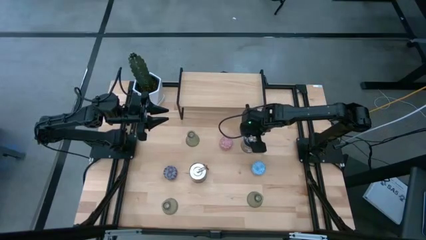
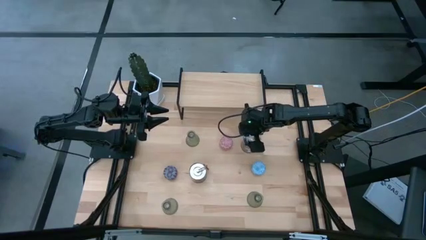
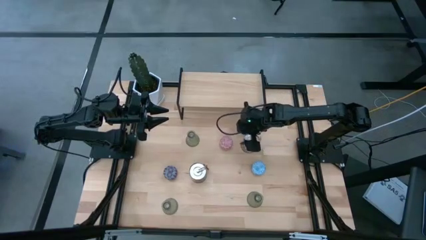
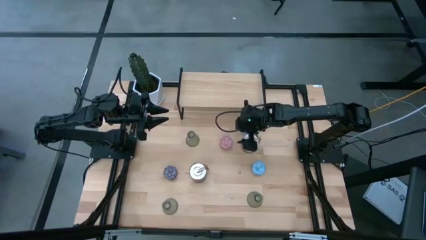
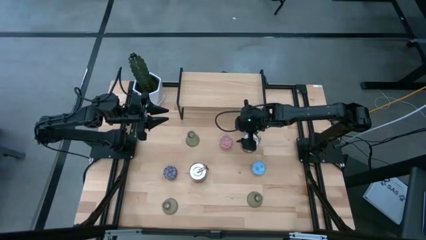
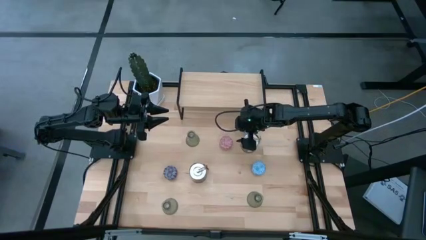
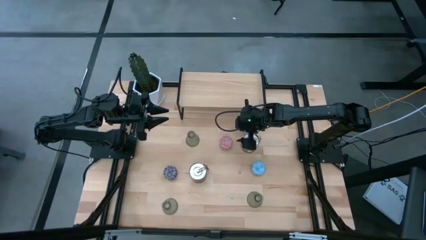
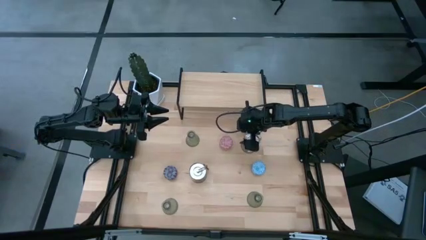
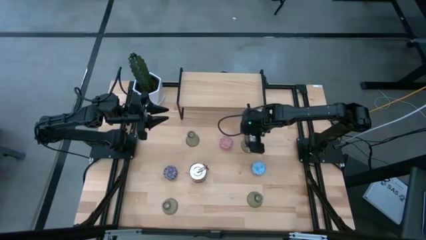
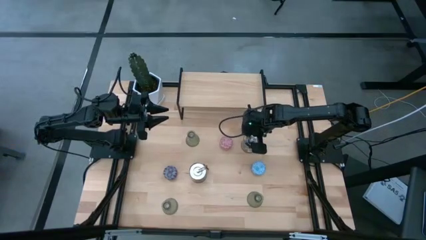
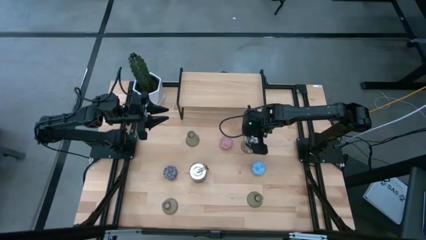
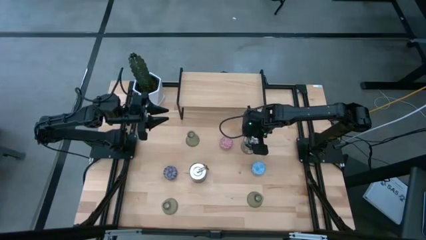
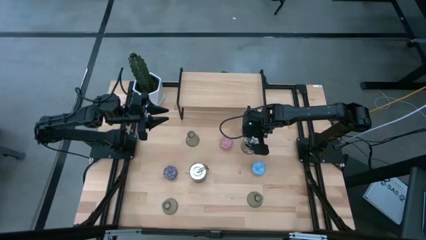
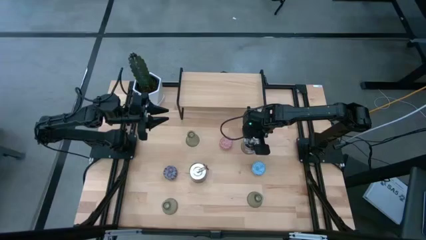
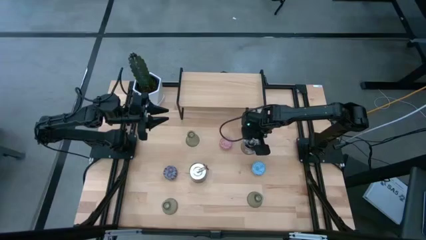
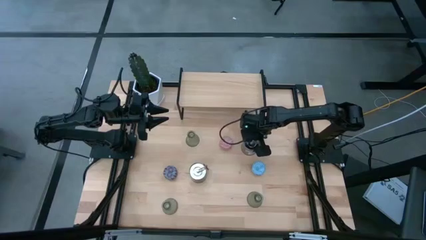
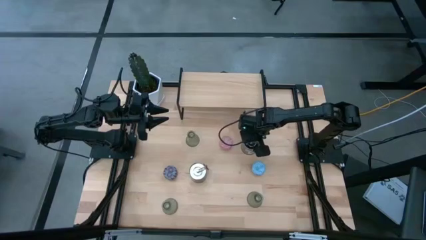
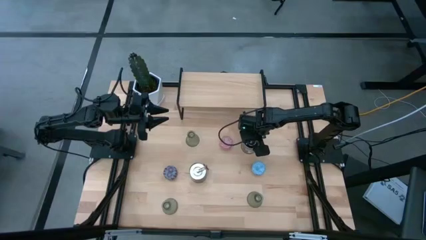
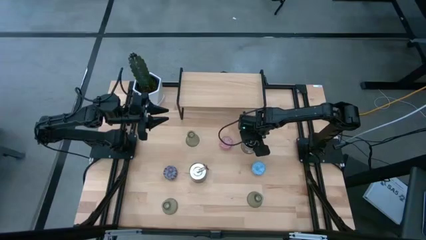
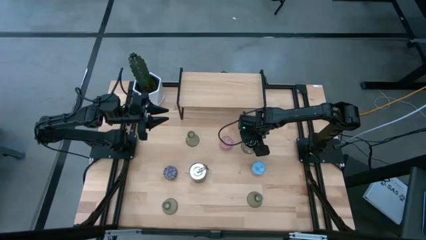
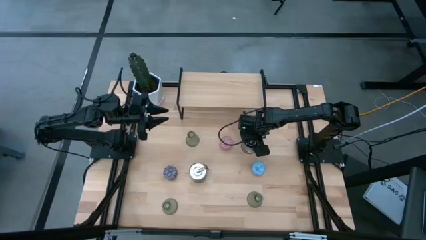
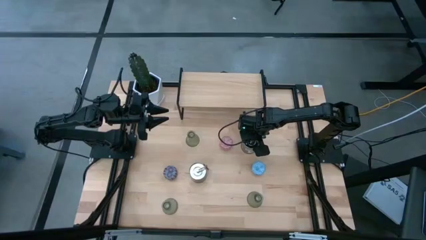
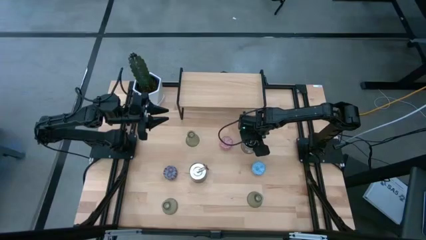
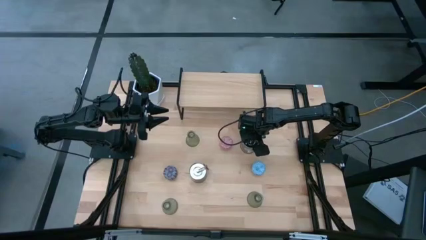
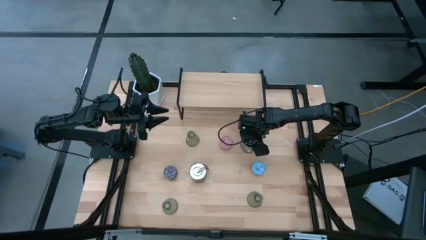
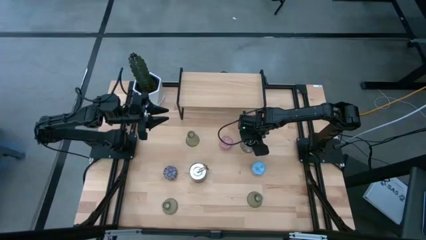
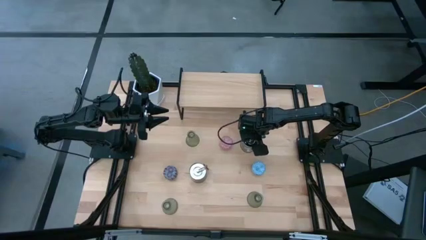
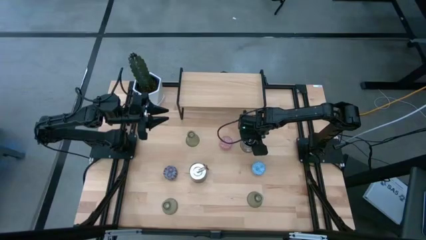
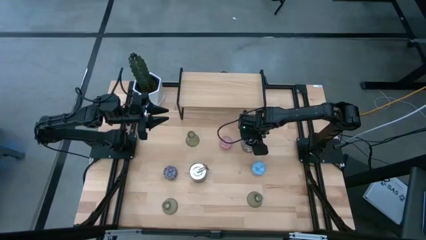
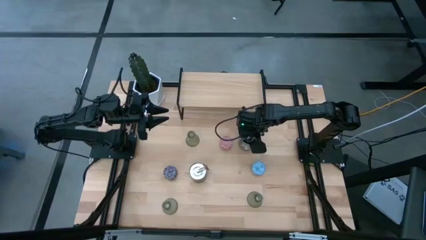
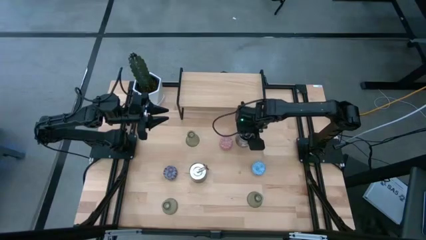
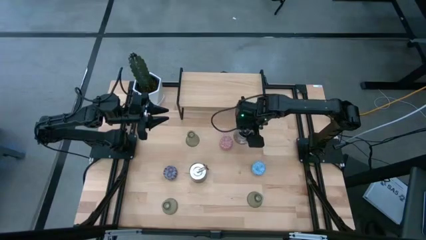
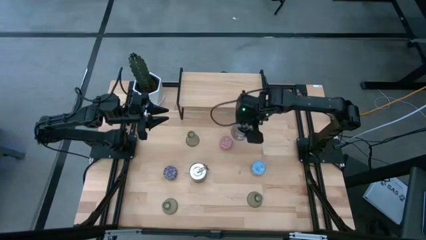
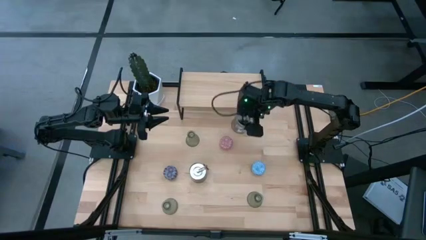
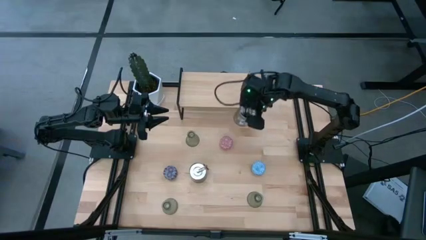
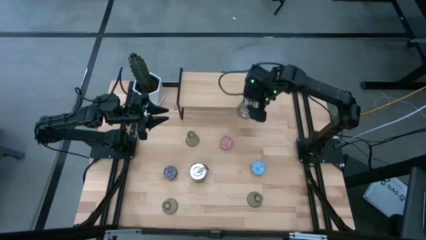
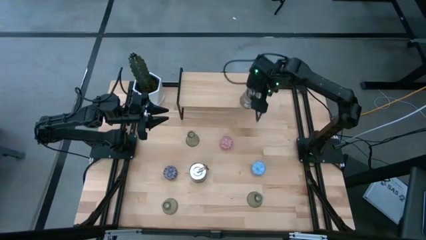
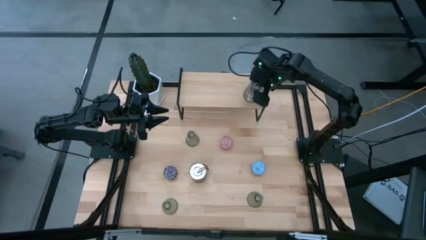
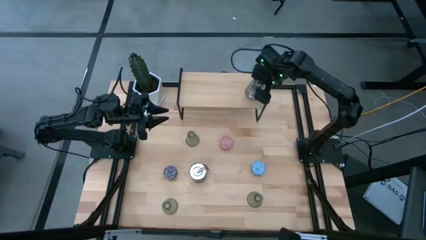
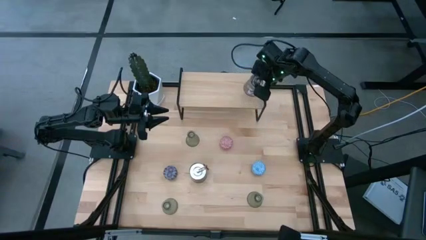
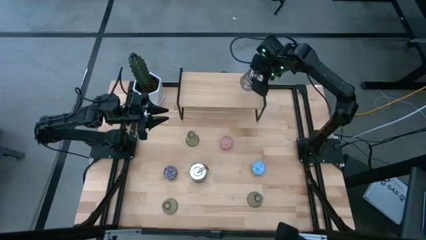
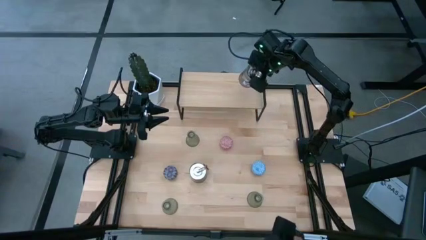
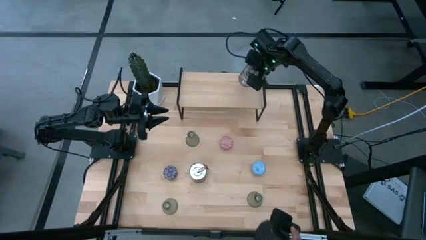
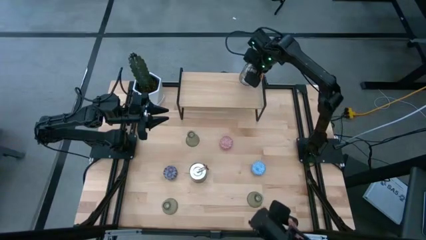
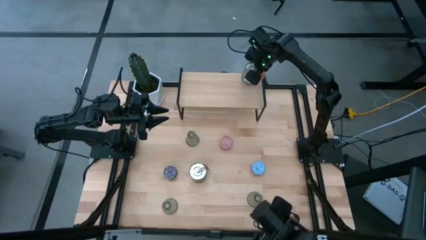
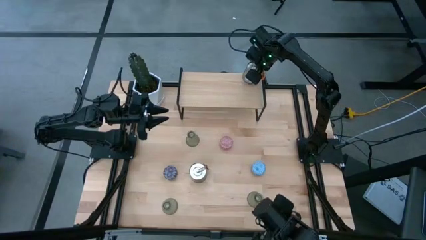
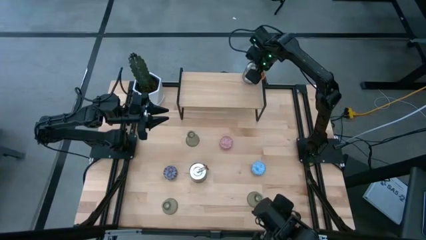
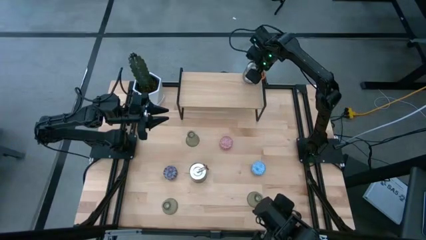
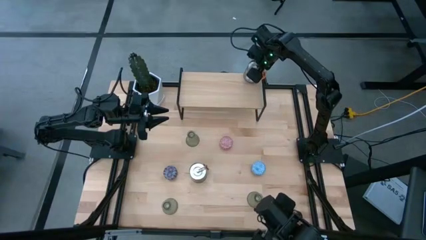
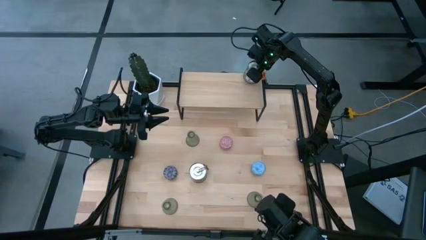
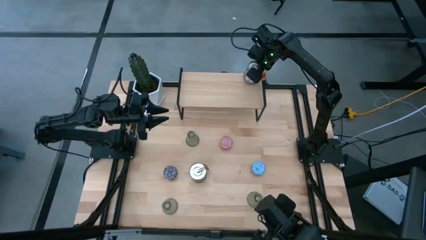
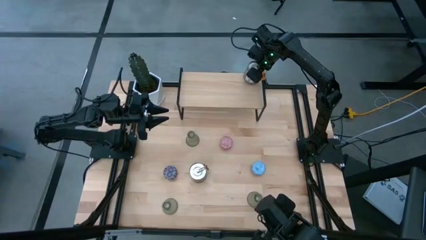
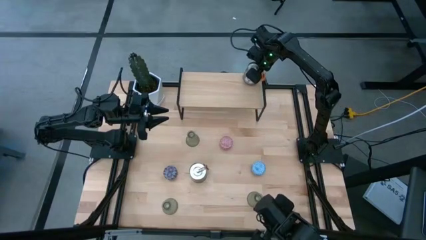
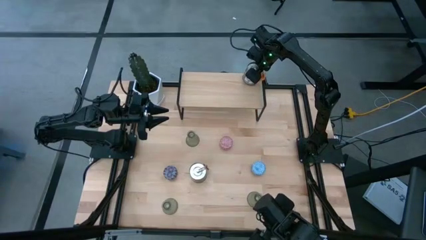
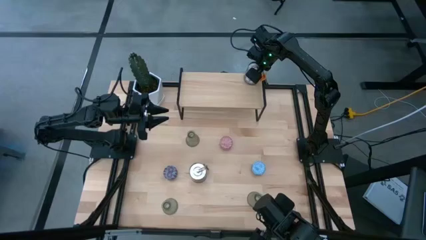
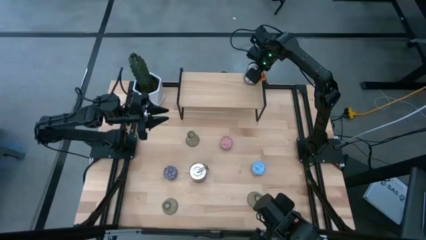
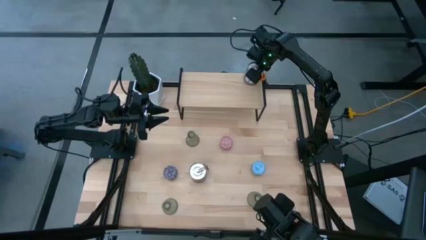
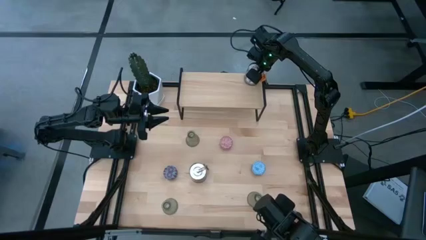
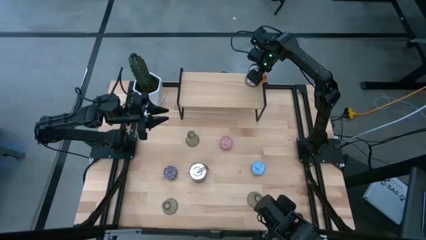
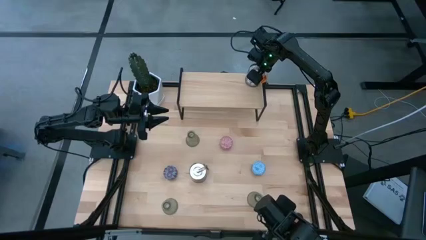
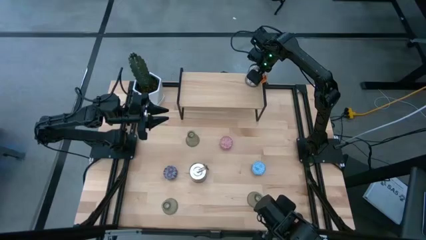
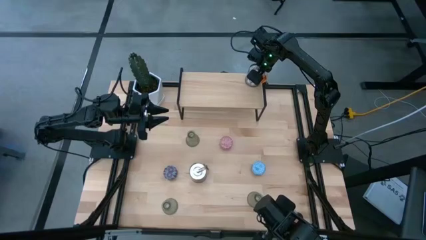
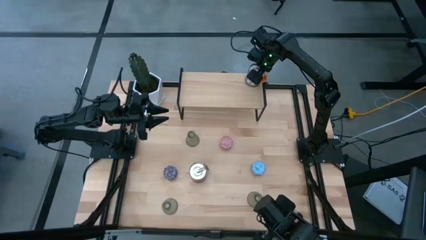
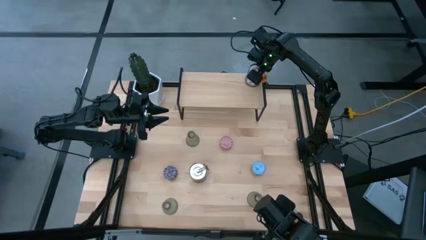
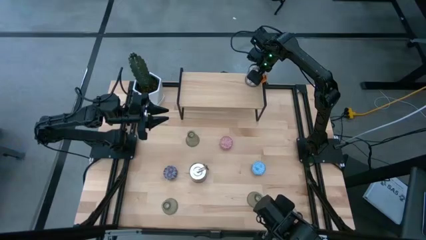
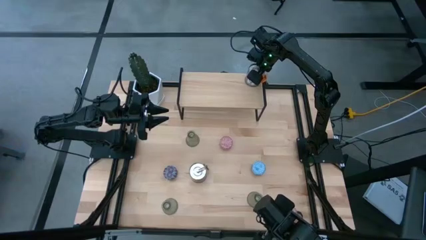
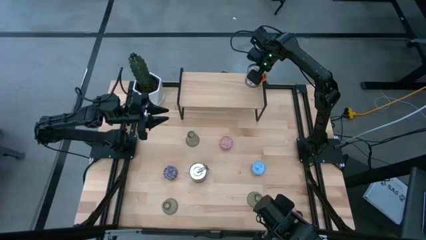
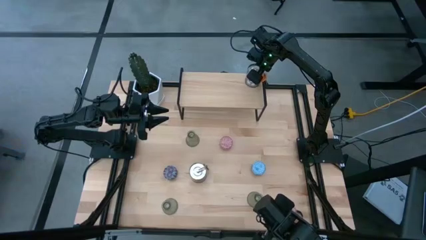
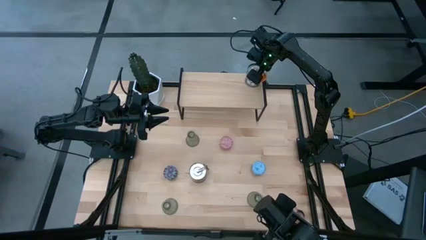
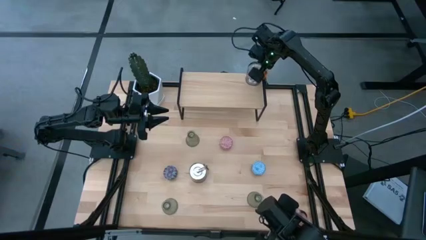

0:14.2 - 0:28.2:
Task: Pick & Place candle stick holders
Put the top right silver scented candle on the shelf
